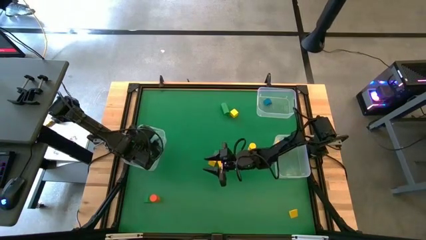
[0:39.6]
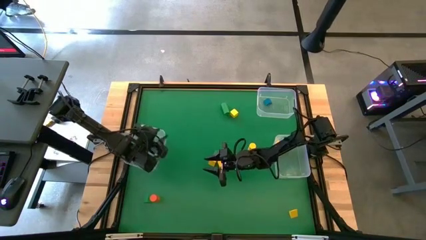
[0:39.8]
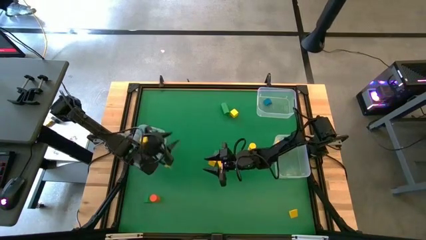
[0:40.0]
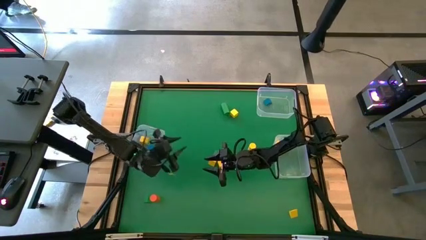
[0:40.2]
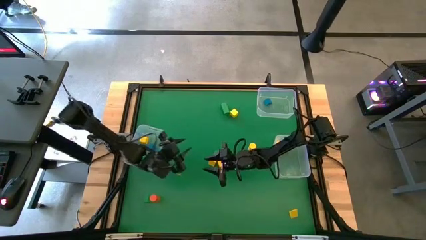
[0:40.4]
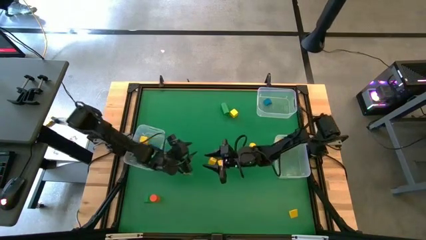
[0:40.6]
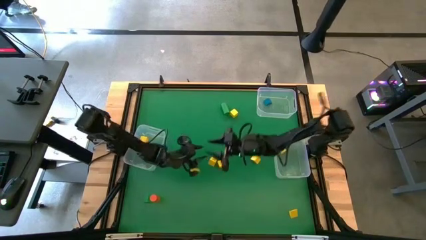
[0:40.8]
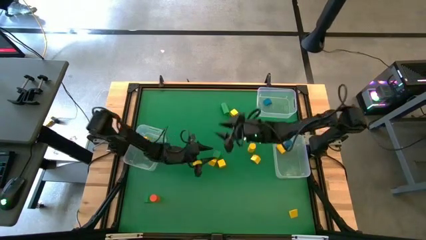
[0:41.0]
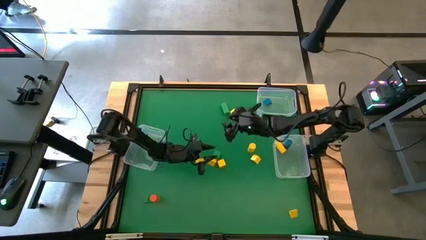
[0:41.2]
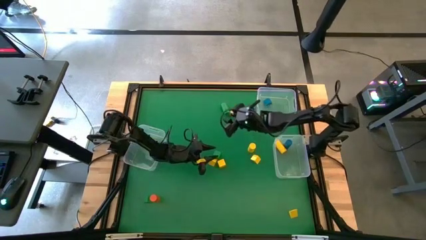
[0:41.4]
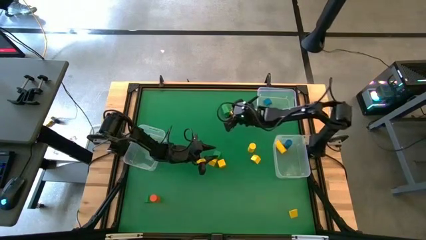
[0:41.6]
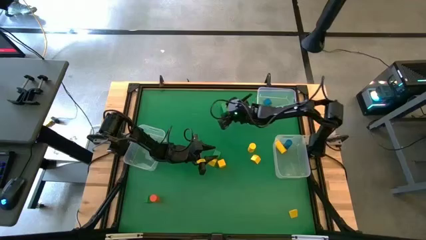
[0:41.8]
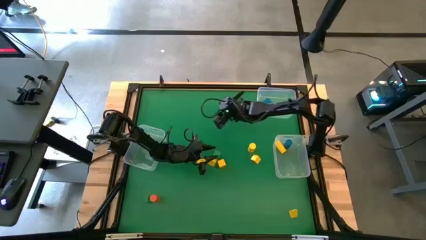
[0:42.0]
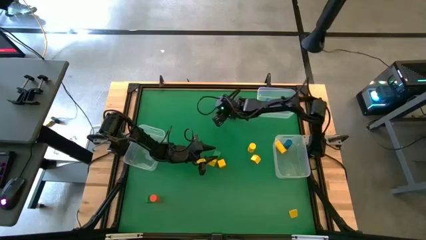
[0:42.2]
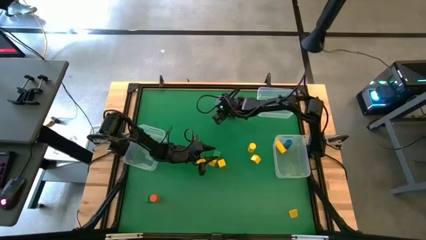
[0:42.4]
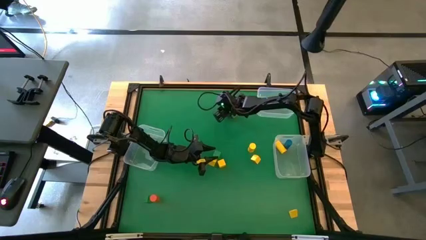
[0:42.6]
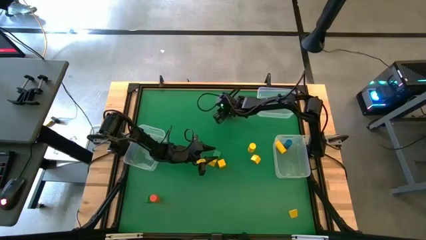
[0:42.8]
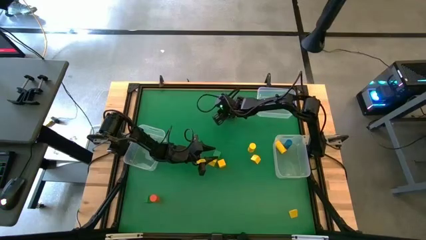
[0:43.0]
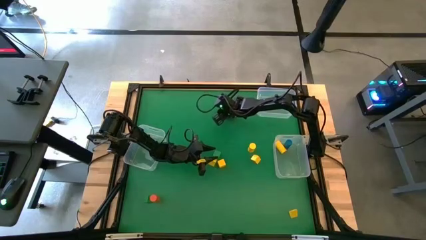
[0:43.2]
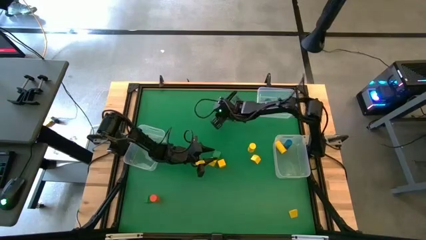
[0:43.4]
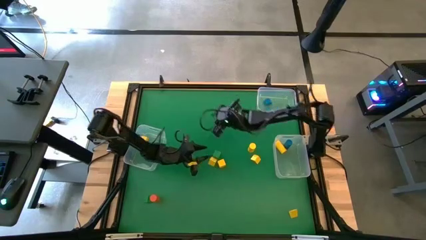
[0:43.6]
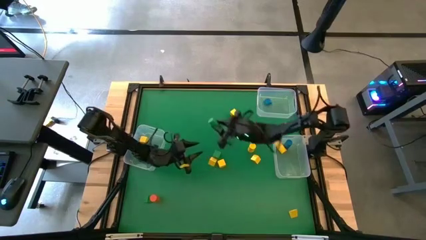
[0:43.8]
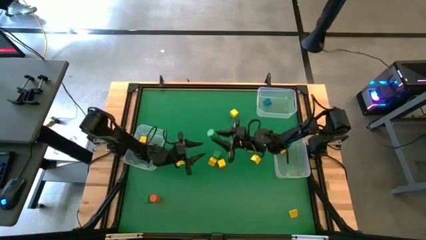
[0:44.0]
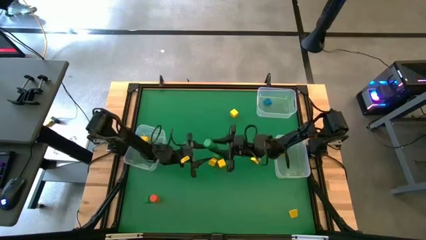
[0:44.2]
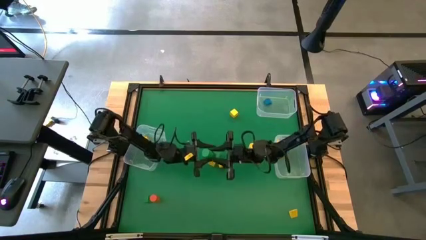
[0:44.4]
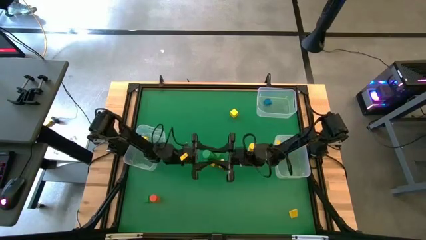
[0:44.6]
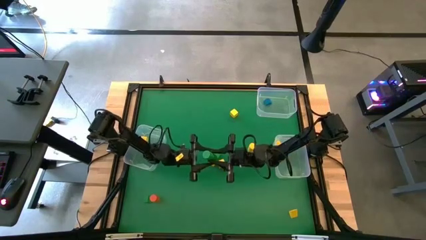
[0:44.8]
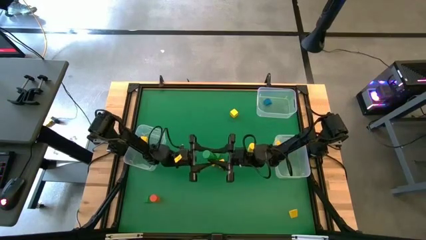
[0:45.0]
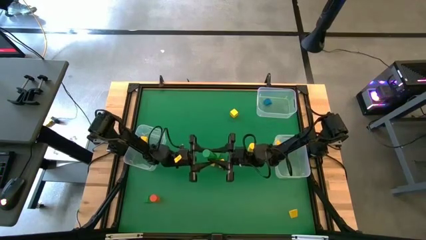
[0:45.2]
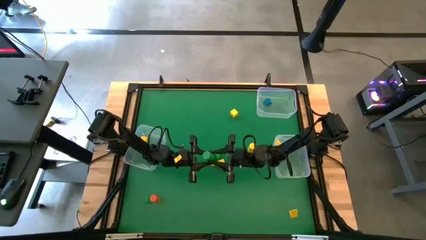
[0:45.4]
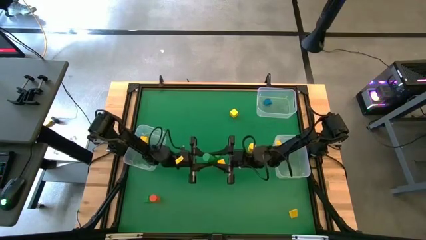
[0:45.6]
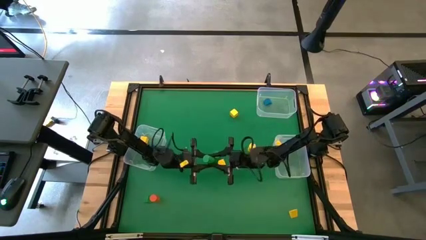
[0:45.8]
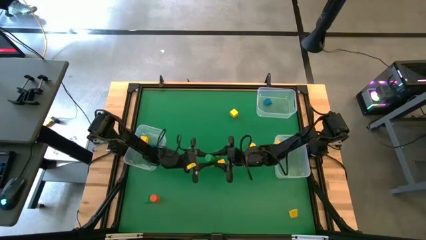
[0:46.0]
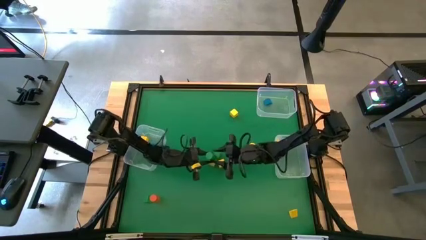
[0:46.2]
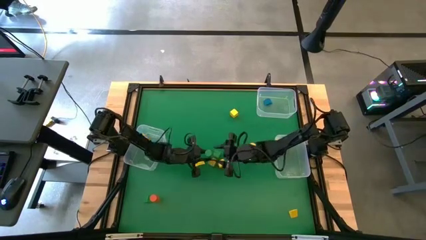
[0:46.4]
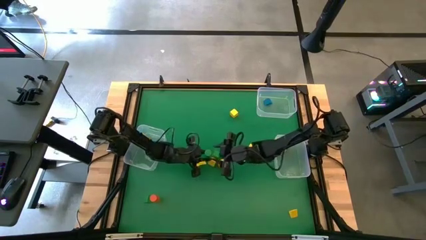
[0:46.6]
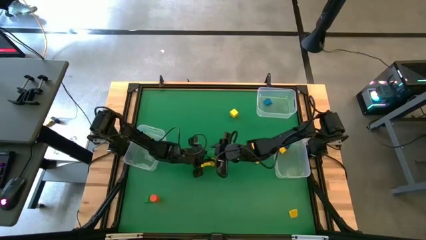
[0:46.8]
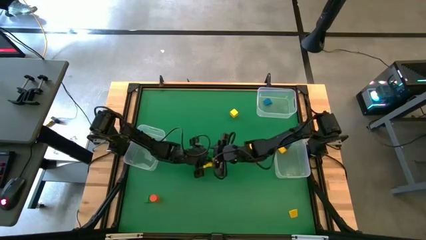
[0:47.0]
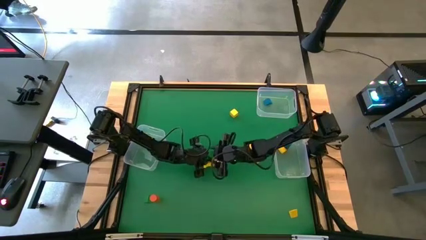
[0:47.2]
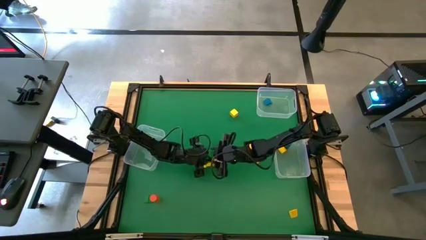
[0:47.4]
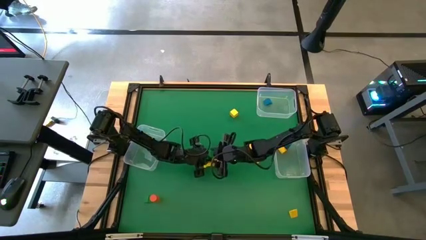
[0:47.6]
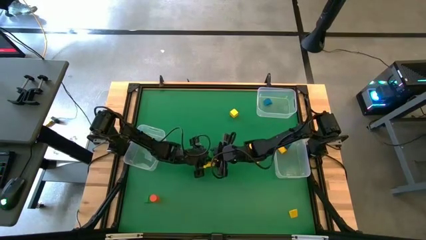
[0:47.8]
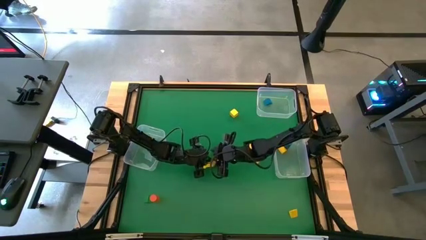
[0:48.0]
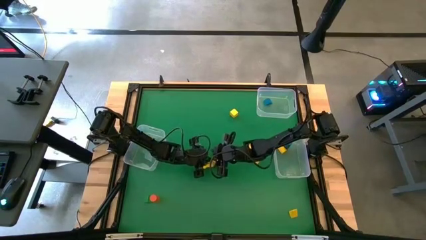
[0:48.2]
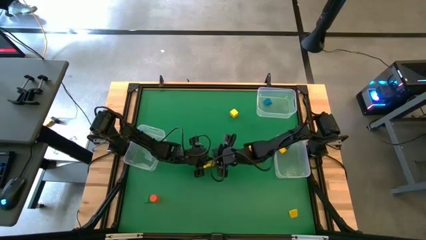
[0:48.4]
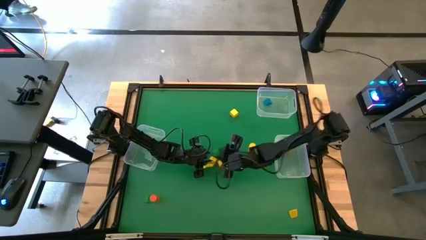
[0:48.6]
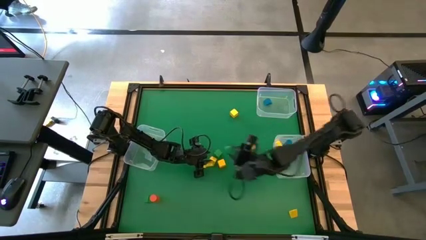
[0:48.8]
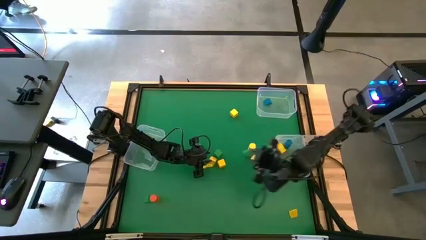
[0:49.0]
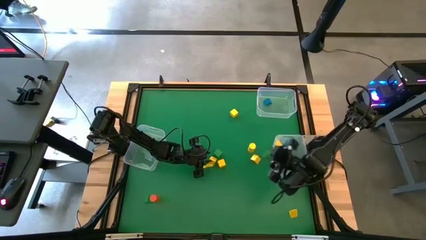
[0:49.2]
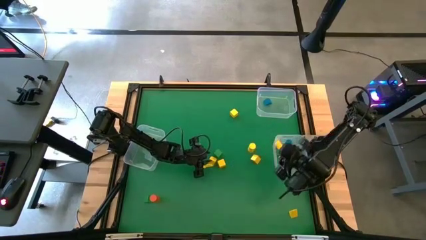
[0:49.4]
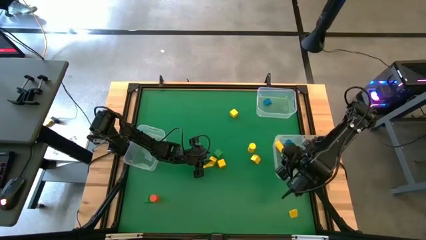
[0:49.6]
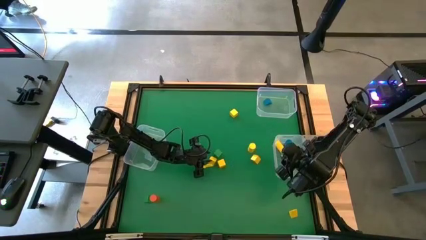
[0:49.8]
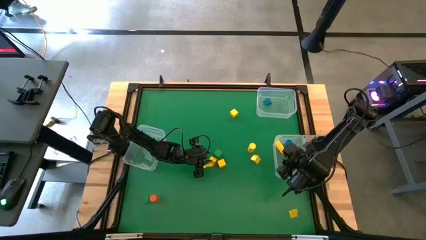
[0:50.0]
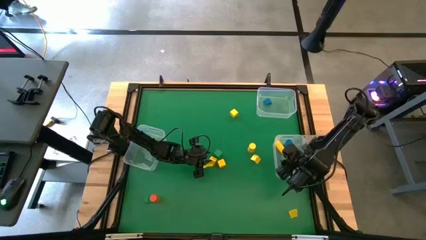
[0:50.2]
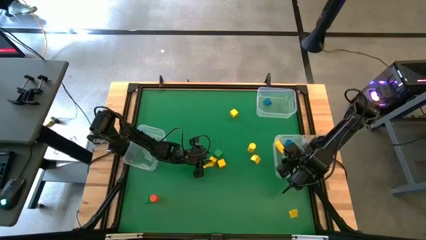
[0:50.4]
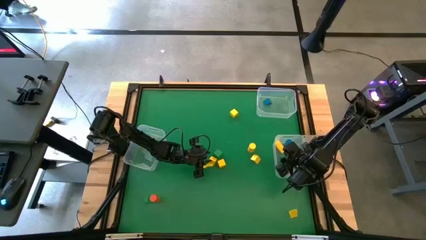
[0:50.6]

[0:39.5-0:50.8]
Task: Sort blocks by size
Put the green cylindrical block into the bottom right transparent bin

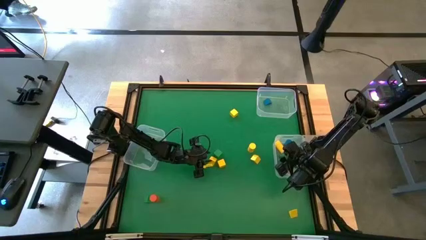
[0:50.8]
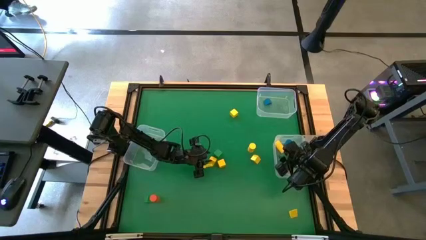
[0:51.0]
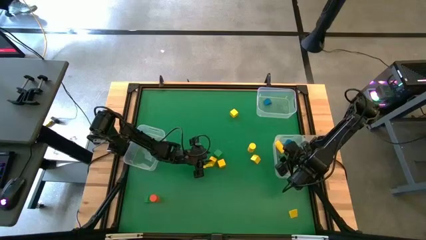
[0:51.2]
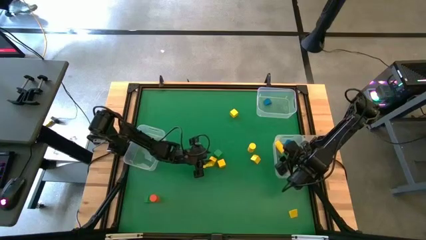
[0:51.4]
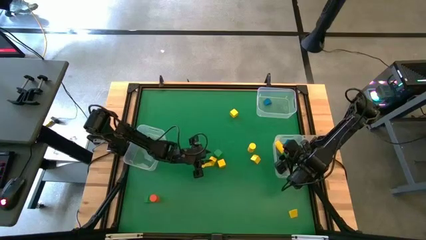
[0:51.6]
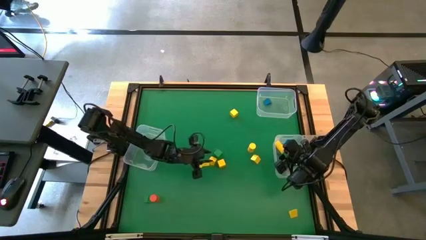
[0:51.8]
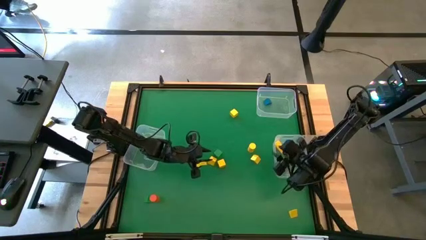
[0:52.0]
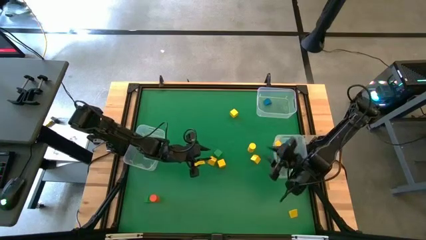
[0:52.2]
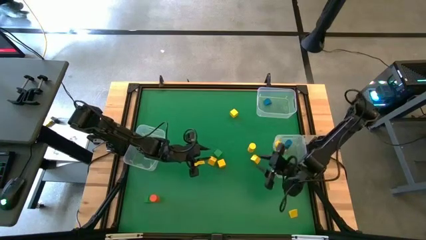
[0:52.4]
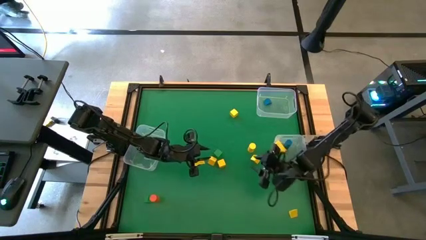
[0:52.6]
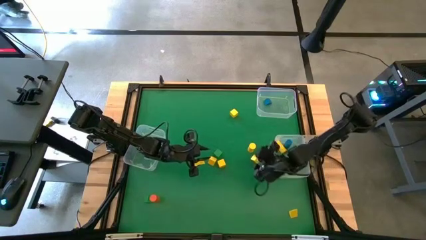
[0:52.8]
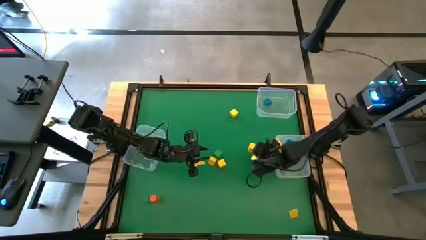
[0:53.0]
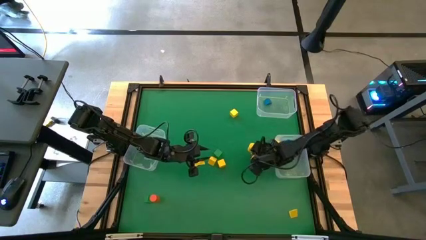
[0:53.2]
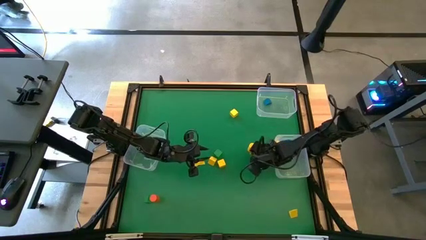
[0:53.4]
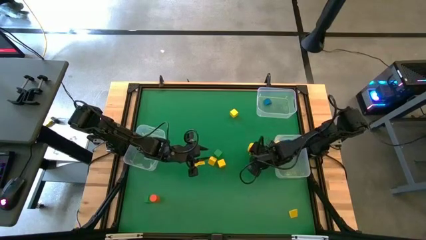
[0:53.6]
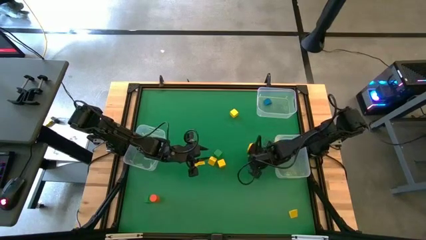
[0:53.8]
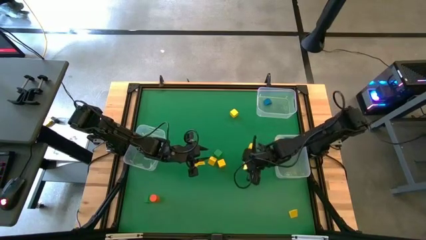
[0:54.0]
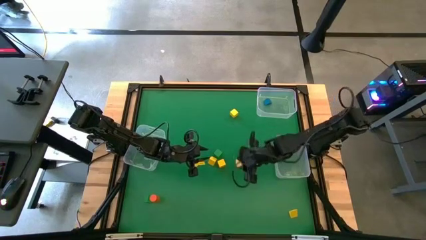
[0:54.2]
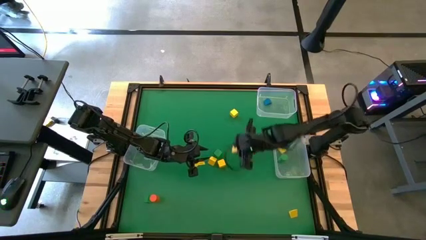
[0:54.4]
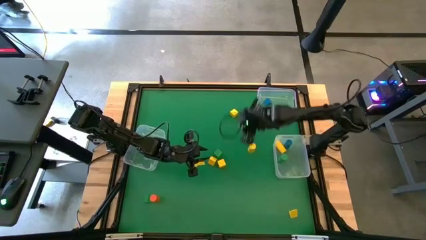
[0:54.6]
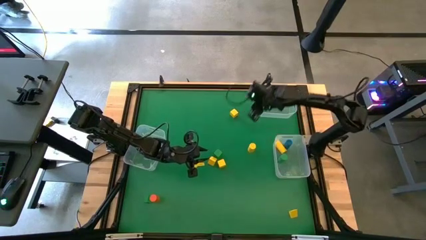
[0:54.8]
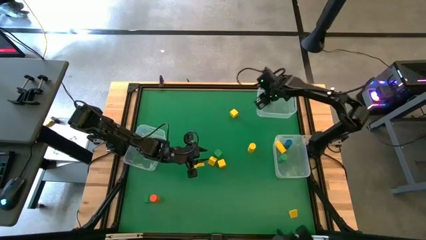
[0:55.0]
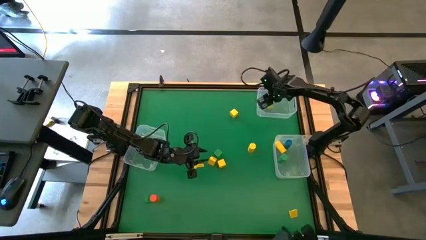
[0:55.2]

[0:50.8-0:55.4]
Put the yellow triangle block into the top right transparent bin
